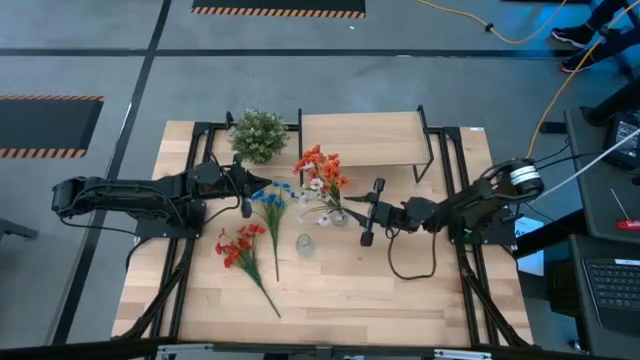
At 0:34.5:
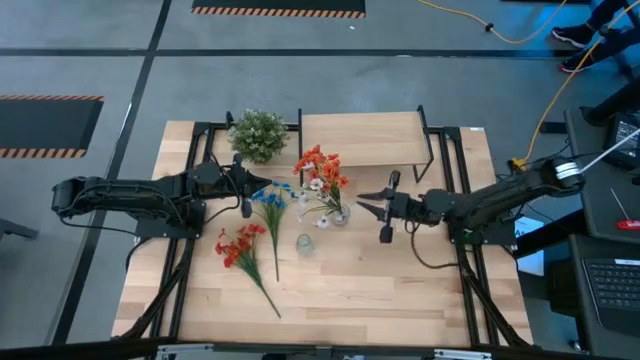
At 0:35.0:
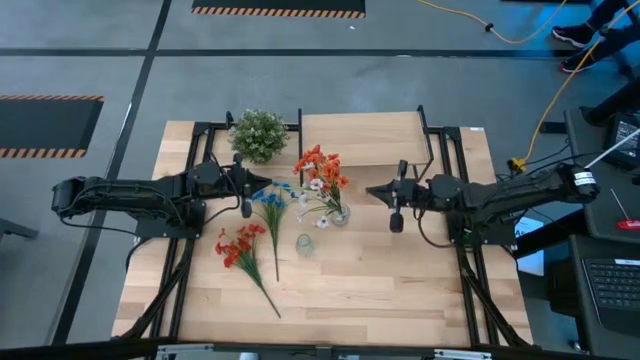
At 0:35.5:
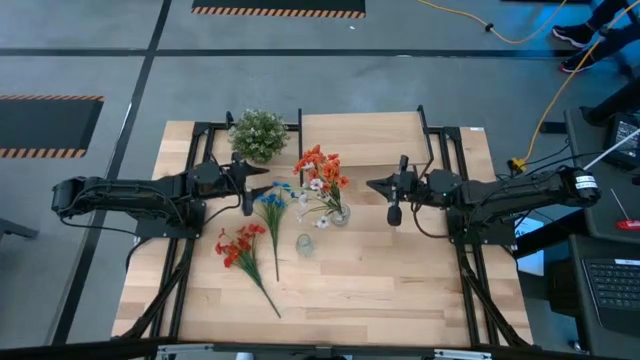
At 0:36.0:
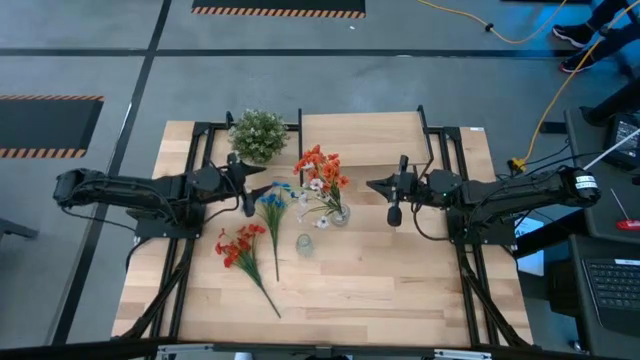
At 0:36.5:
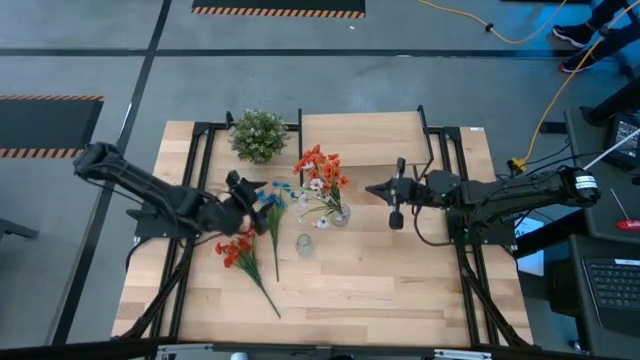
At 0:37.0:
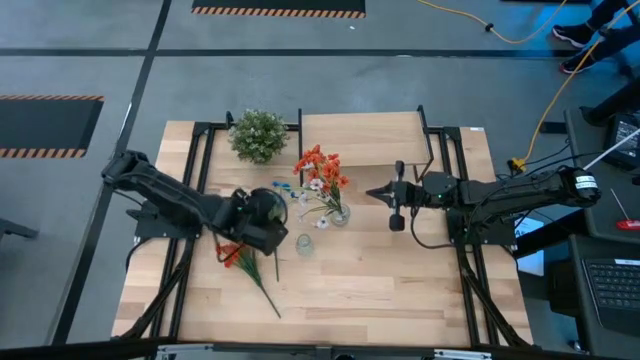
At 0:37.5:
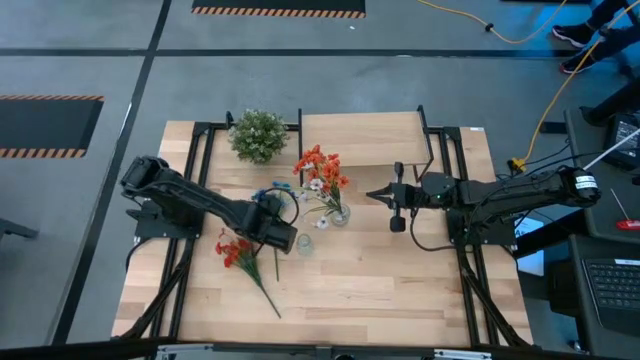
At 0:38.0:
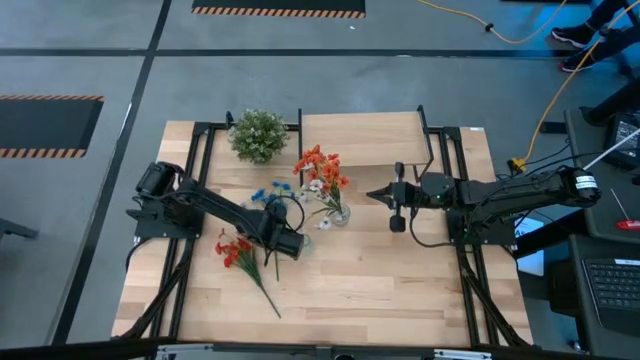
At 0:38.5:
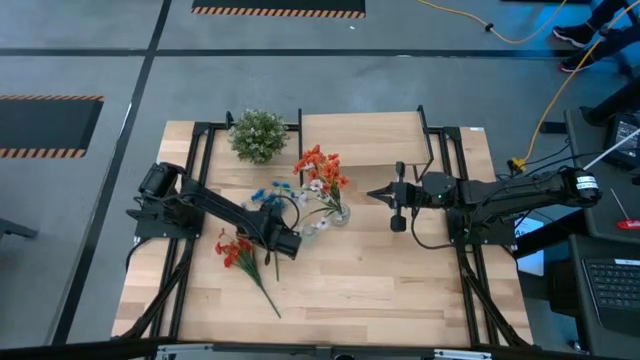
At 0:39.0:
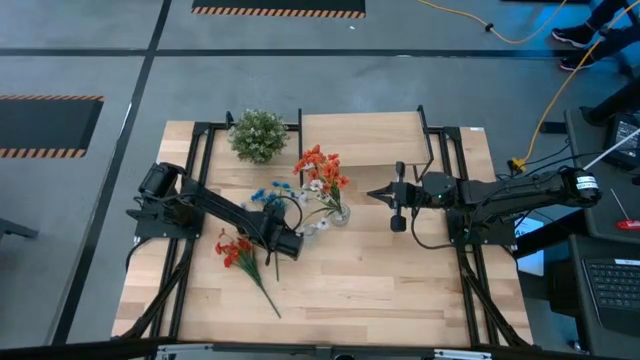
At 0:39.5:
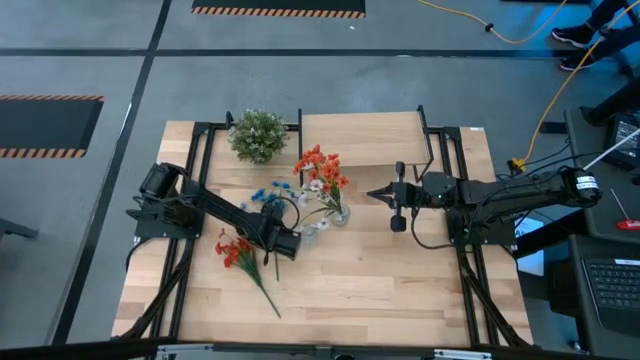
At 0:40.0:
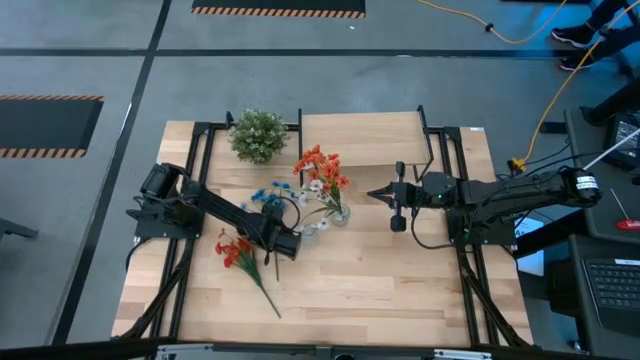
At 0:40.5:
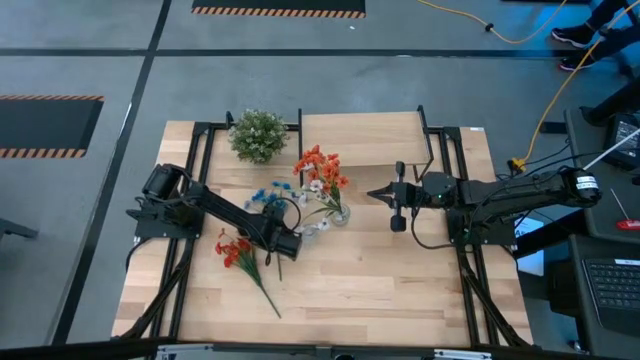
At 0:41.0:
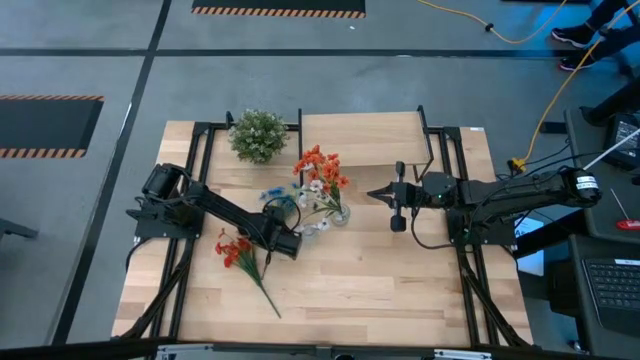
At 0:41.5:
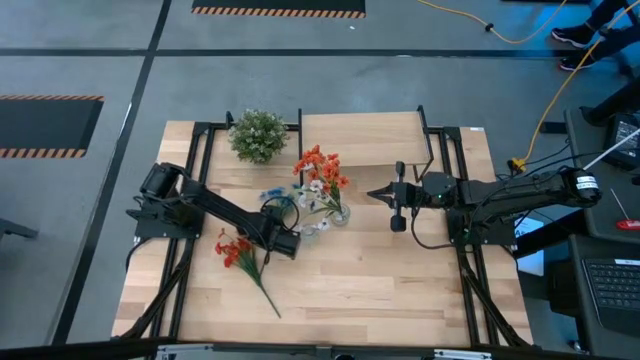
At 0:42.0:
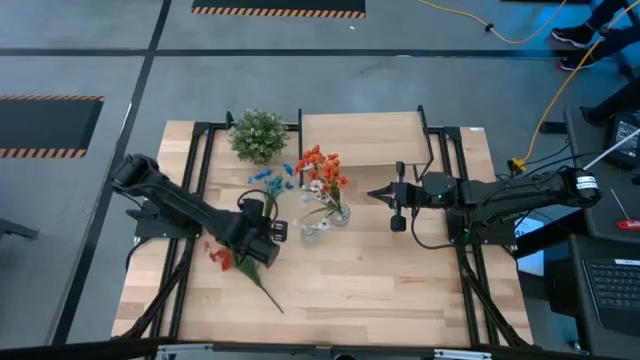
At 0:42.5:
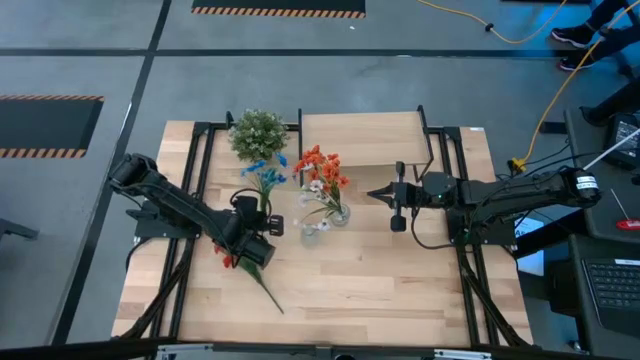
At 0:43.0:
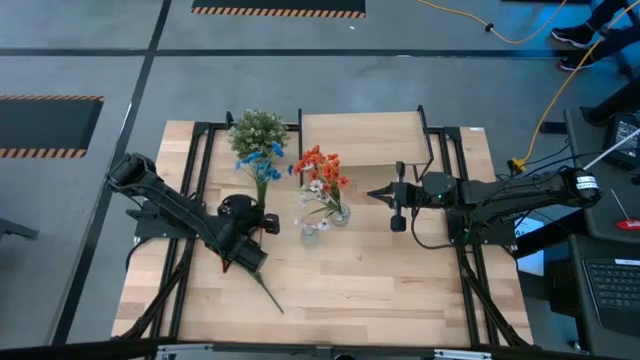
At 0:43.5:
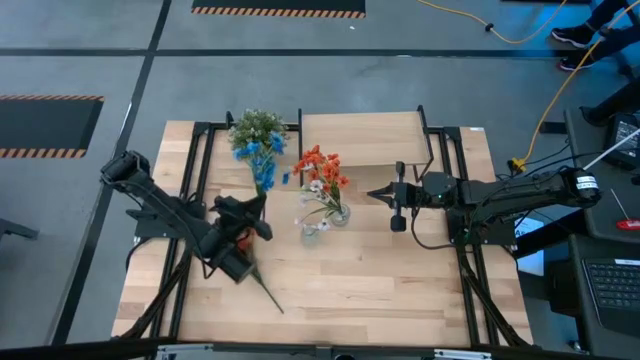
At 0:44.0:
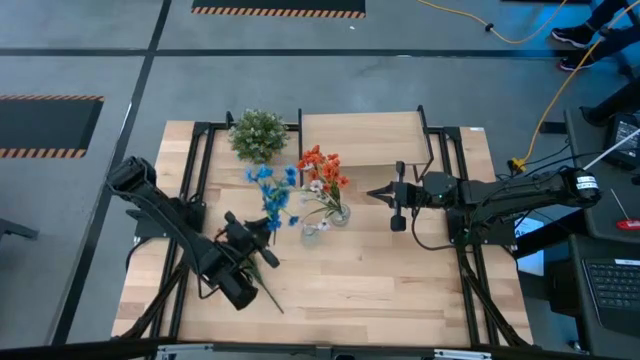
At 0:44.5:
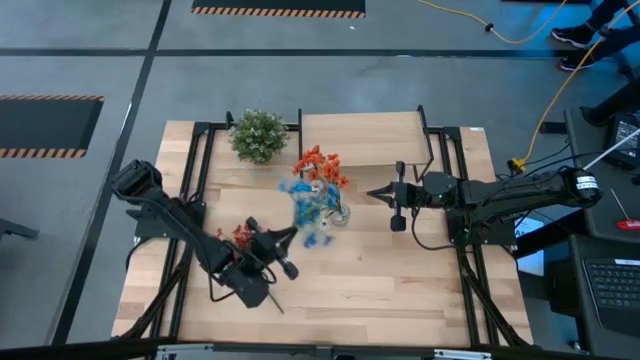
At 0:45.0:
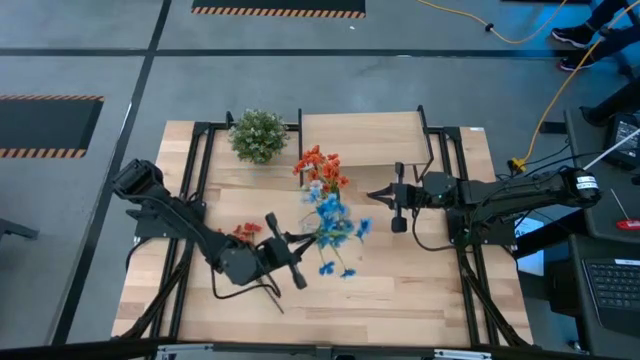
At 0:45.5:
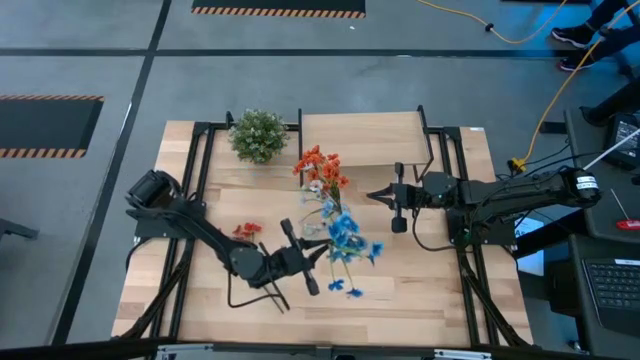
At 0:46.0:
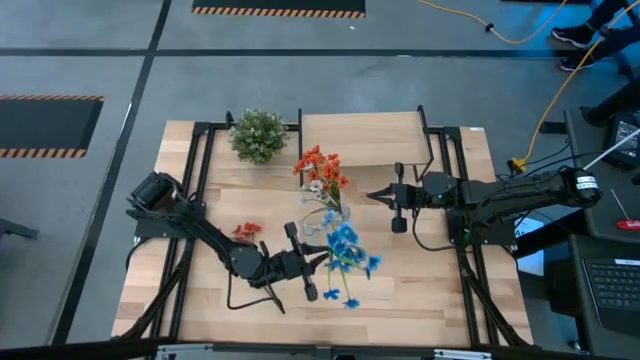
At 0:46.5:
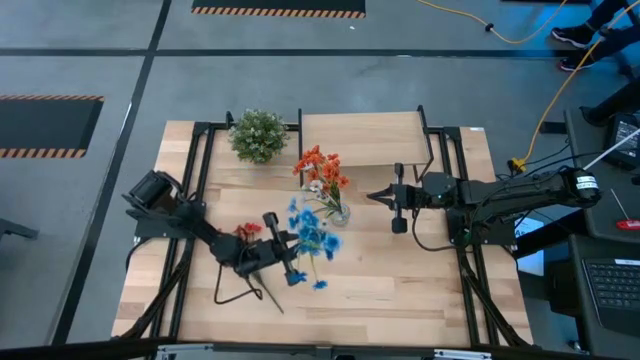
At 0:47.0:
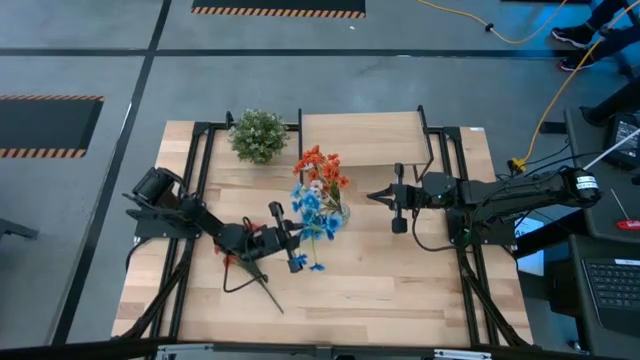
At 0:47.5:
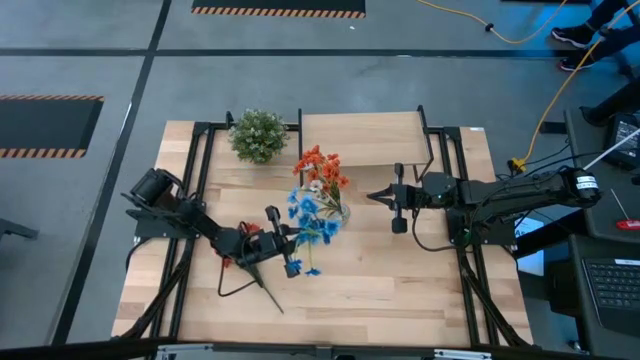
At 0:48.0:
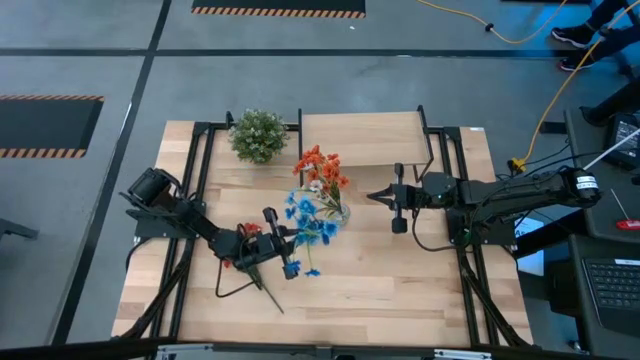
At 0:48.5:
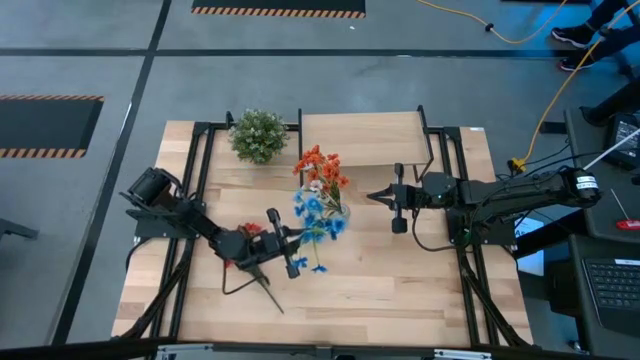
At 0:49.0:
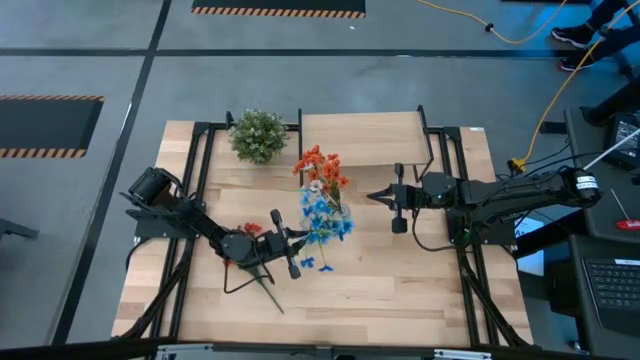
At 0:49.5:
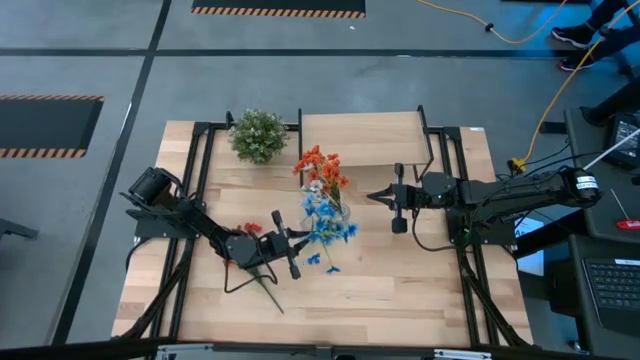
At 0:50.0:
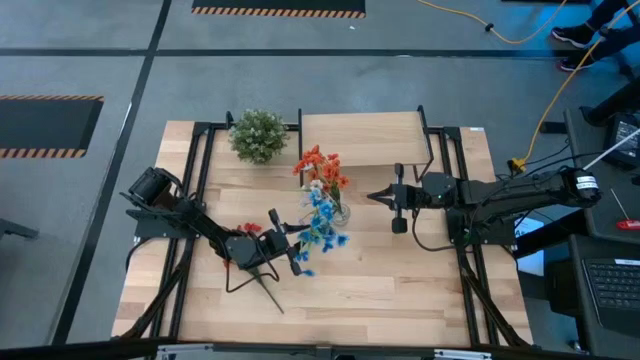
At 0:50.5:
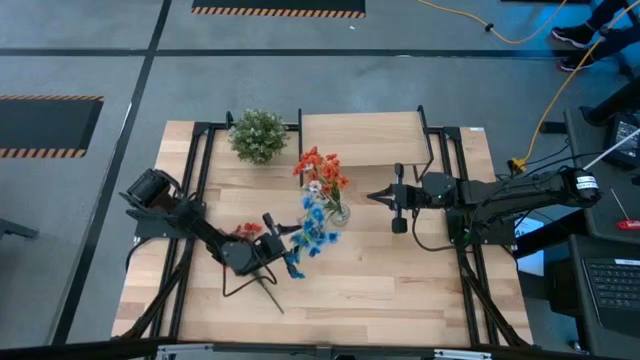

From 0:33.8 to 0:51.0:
Task: Pick and place flowers into a vace then onto a shelf
Put the blue flowers into the bottom transparent vase

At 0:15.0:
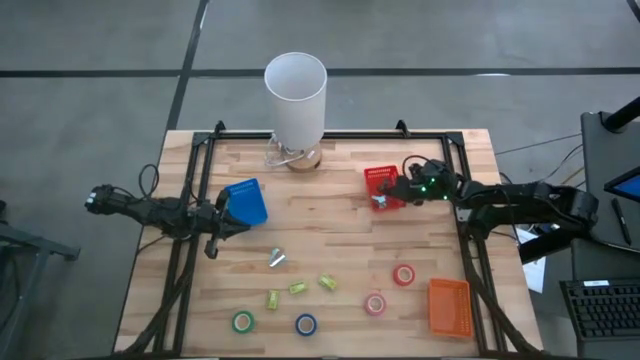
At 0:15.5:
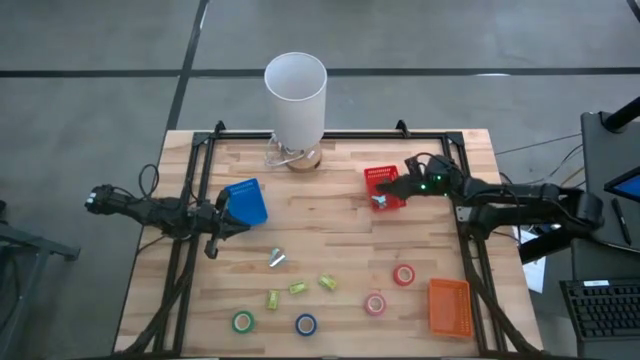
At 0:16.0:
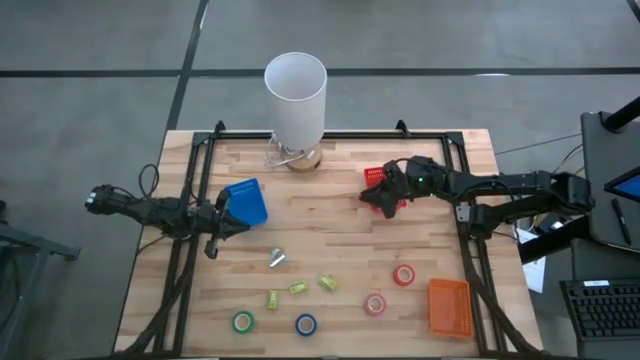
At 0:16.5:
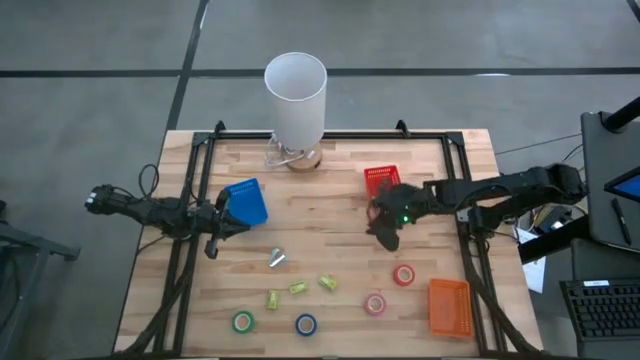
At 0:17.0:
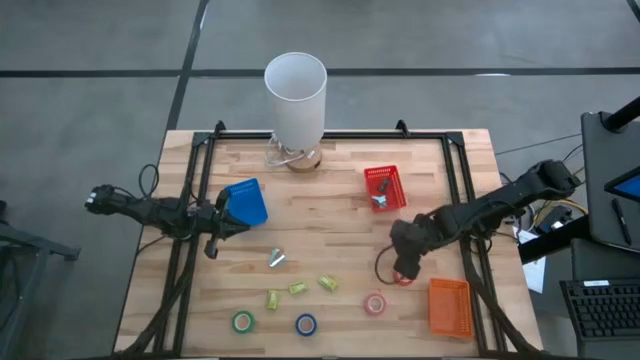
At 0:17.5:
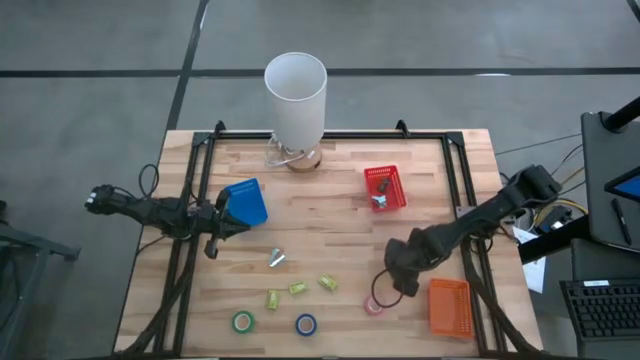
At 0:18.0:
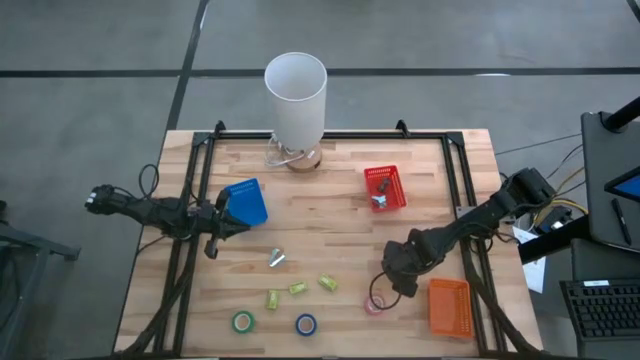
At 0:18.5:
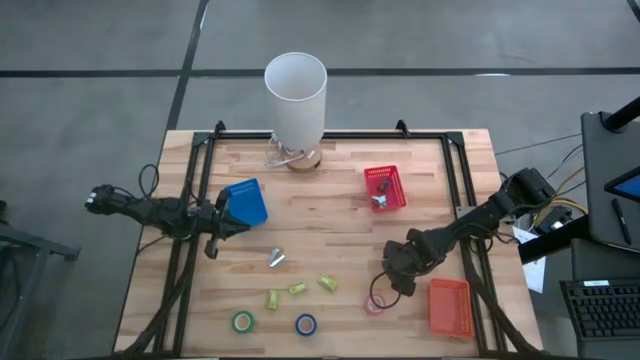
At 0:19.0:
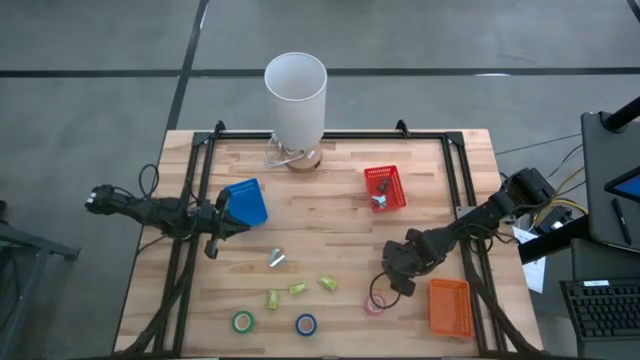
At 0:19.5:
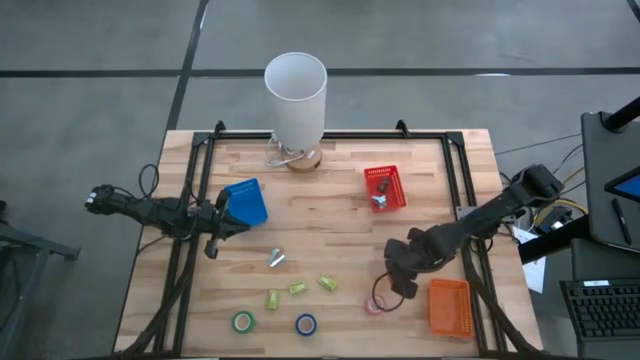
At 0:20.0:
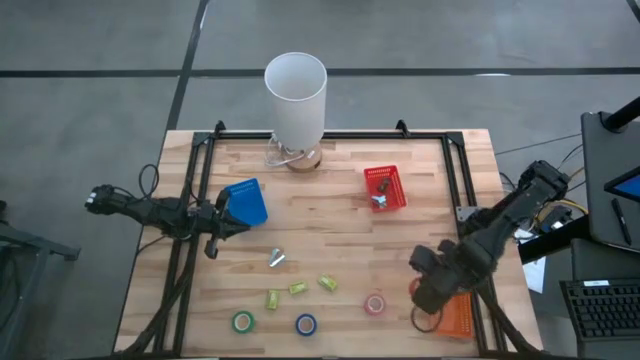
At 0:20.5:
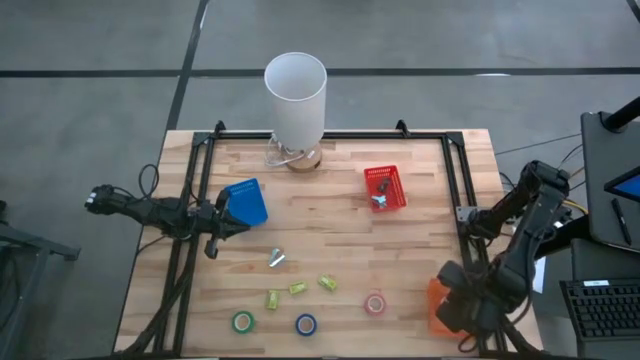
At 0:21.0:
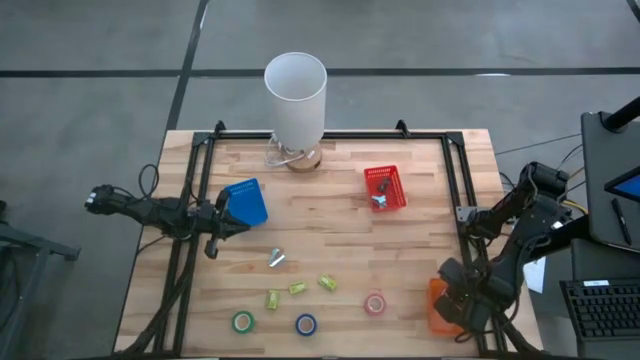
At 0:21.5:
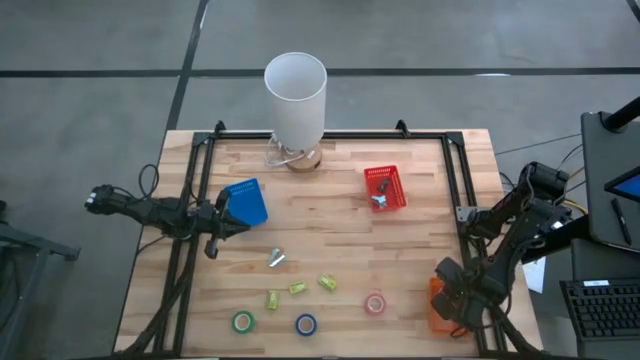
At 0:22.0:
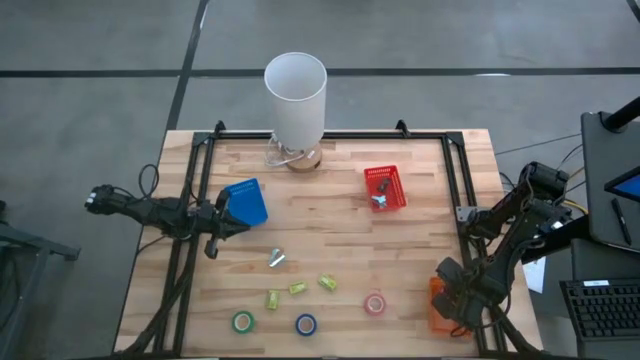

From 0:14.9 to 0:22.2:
Task: Pick and place Stapler, Stapler remover, tape
Put the orange tape into the orange basket
